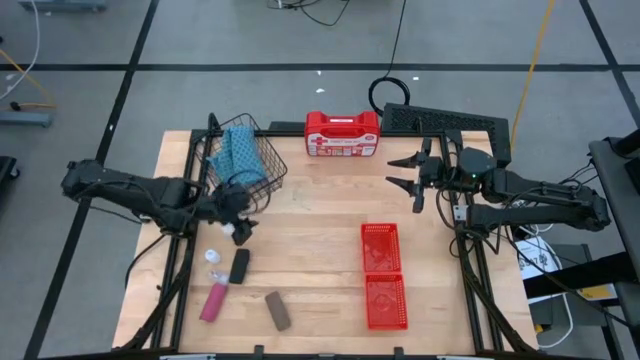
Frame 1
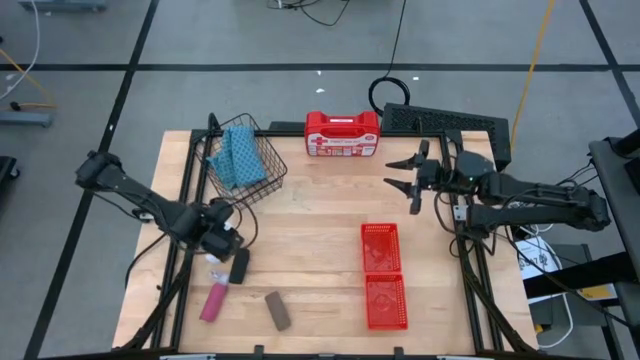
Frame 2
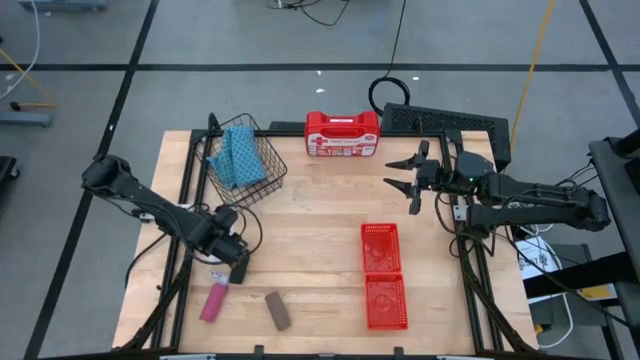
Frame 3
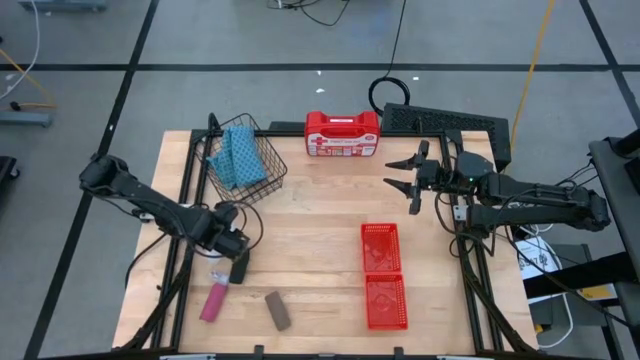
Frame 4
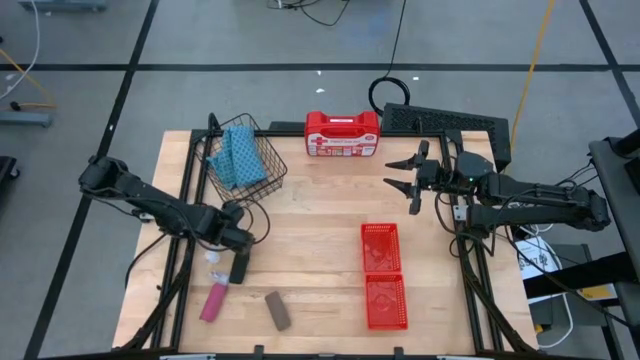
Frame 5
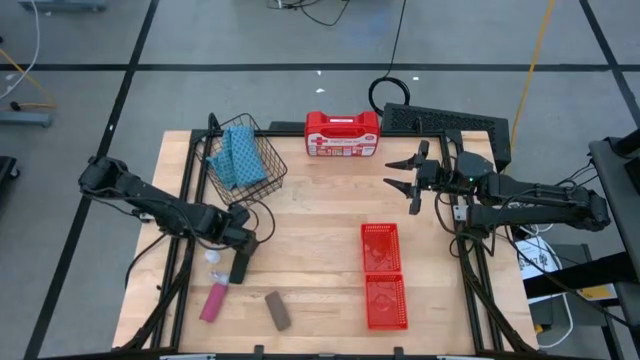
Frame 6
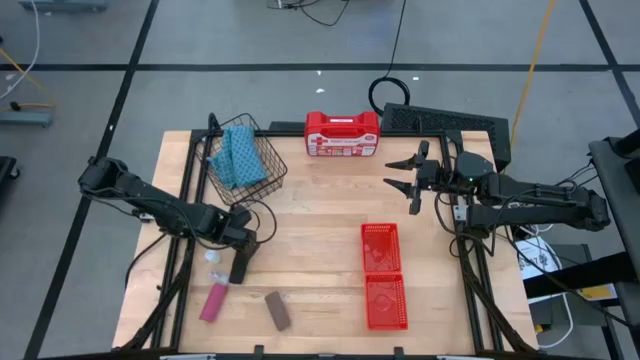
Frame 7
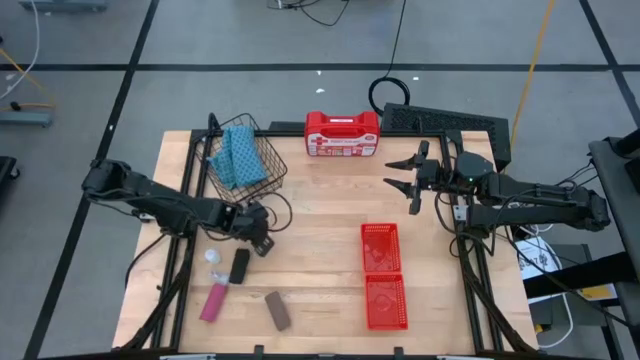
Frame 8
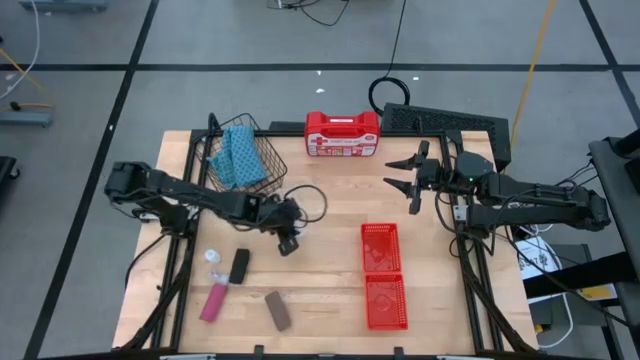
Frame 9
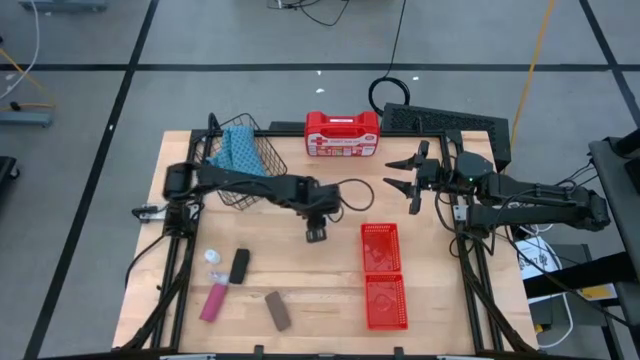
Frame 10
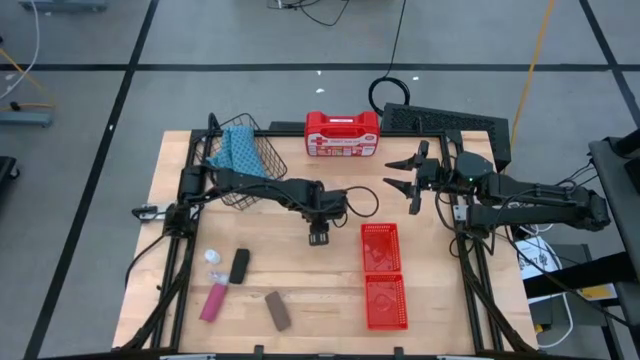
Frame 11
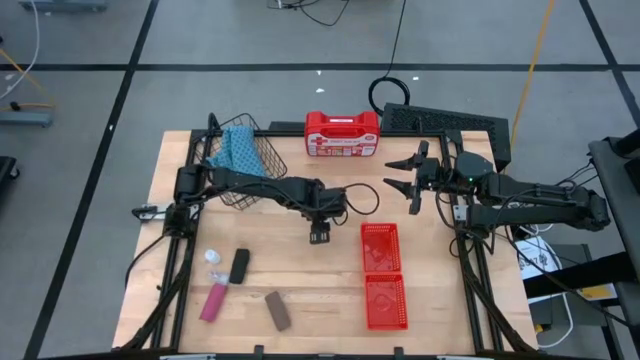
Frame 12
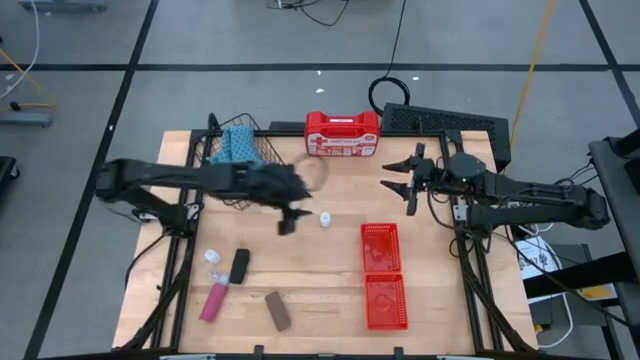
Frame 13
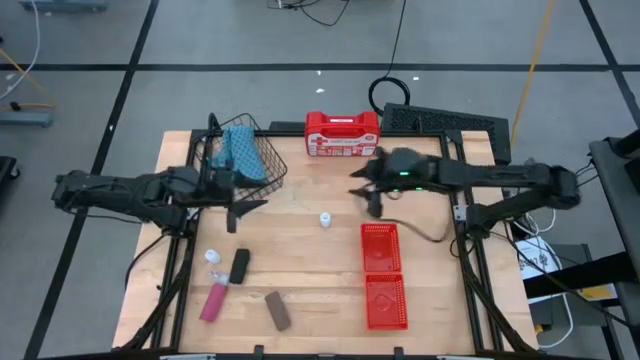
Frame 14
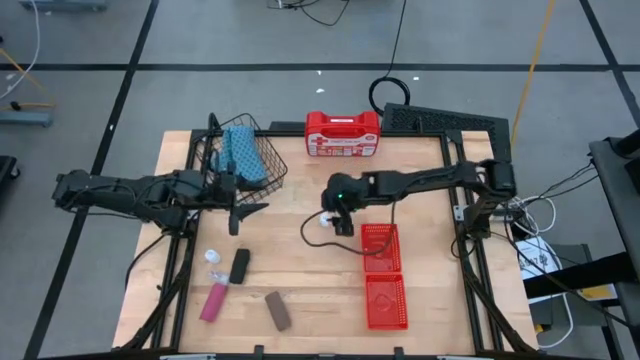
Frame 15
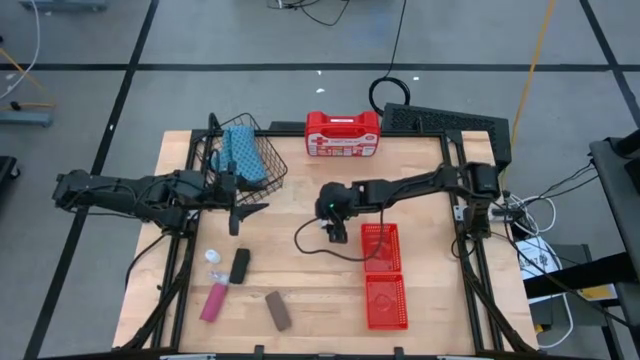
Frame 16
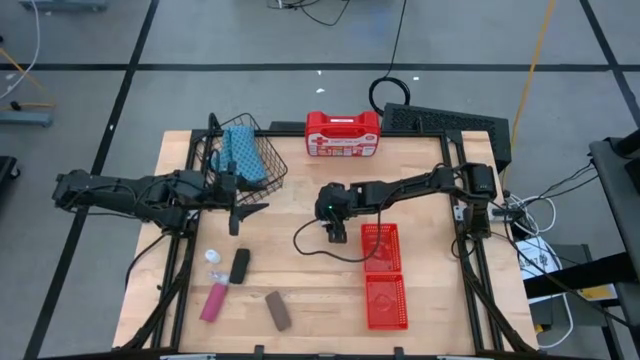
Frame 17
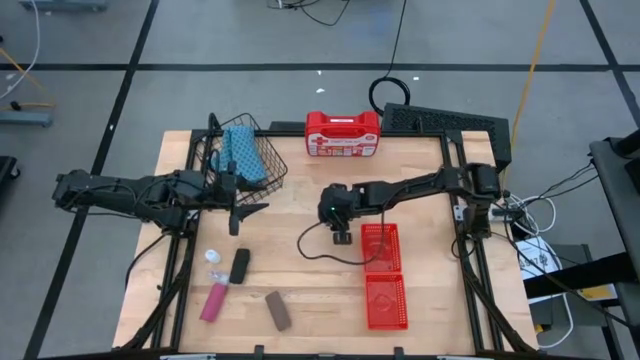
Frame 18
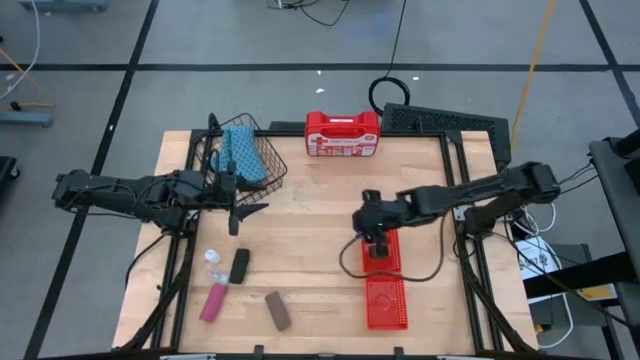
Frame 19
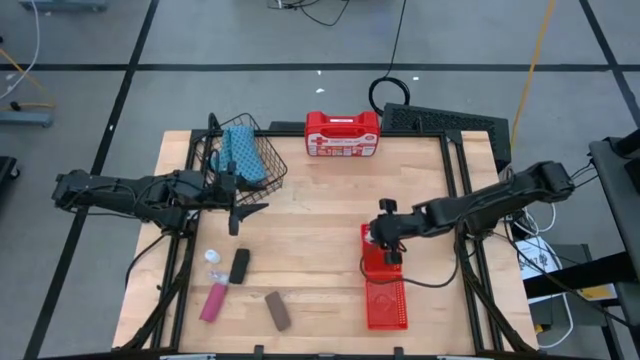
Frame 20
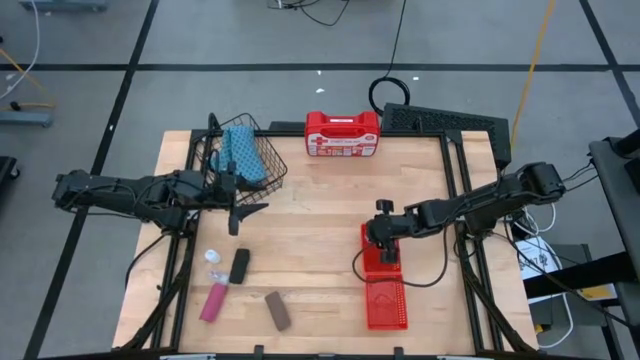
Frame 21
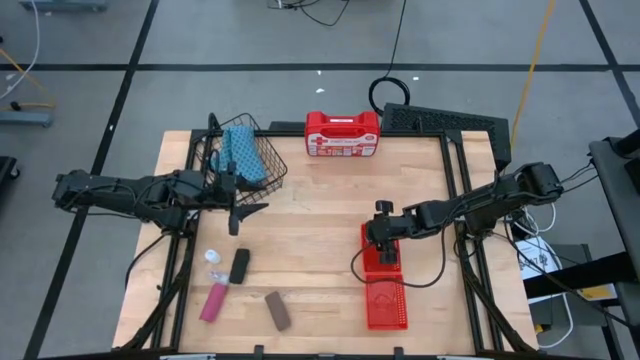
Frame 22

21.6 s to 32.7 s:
Task: Pick & Place Medicine items
Put the top white pill bottle into the top red basket

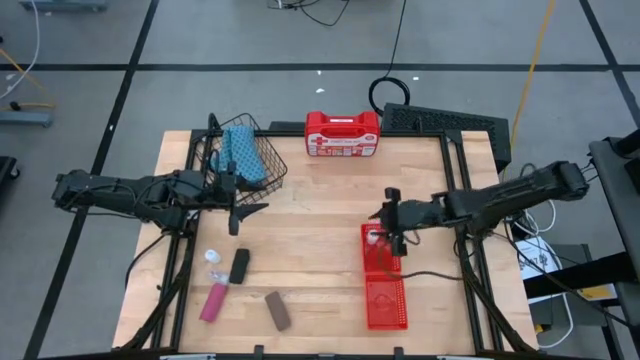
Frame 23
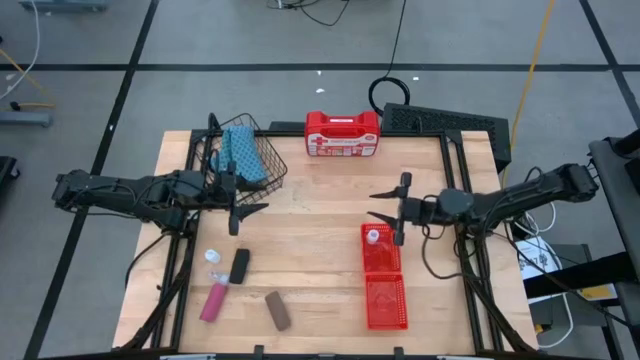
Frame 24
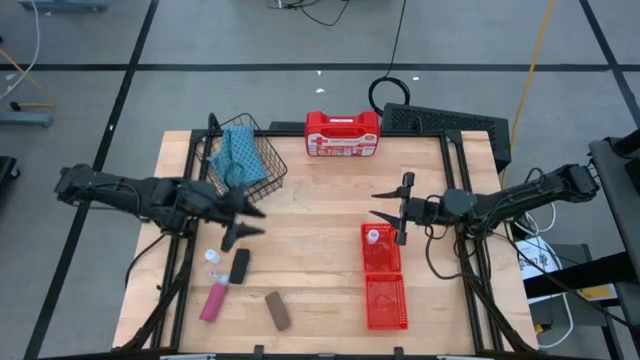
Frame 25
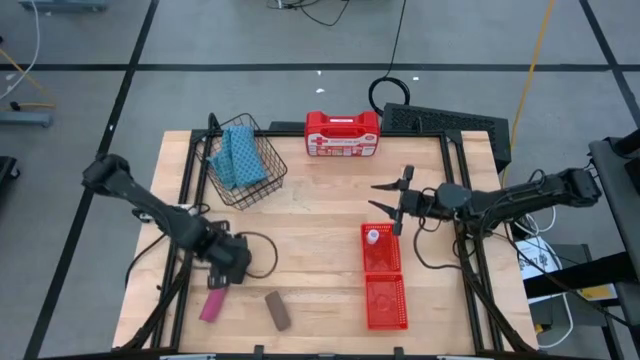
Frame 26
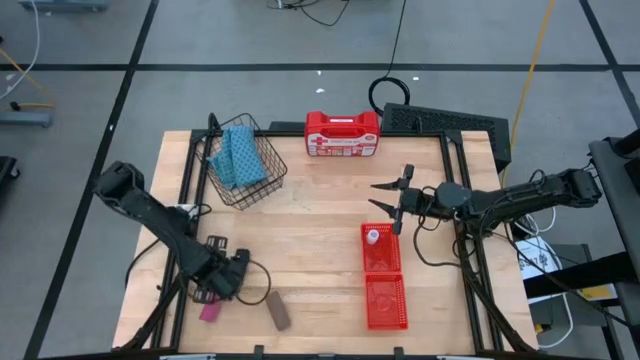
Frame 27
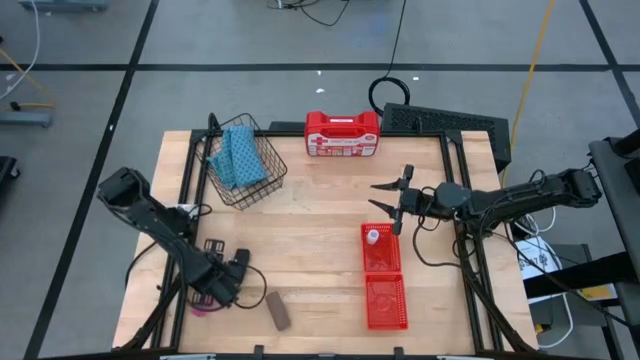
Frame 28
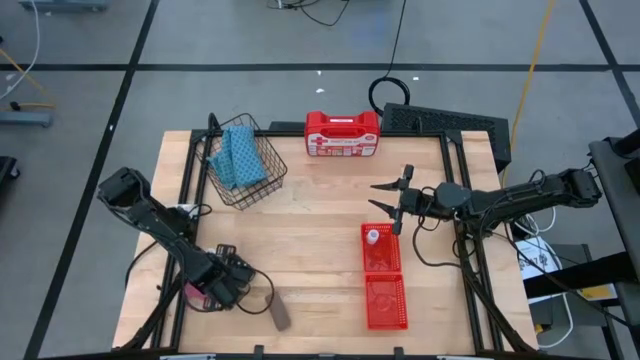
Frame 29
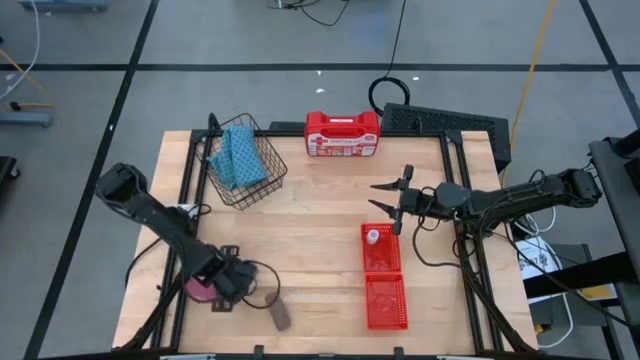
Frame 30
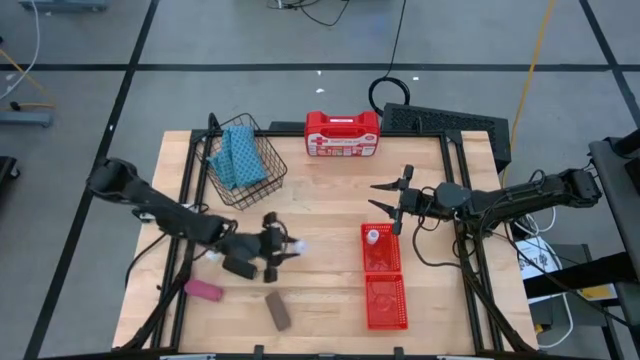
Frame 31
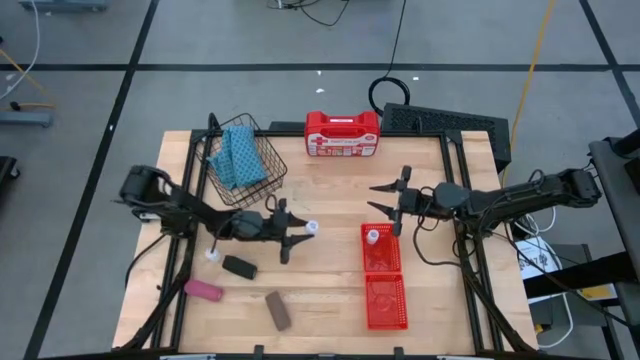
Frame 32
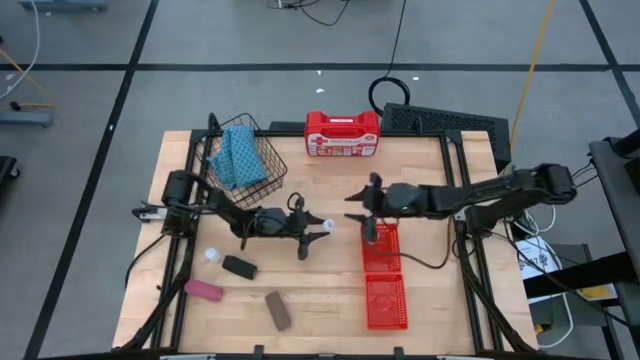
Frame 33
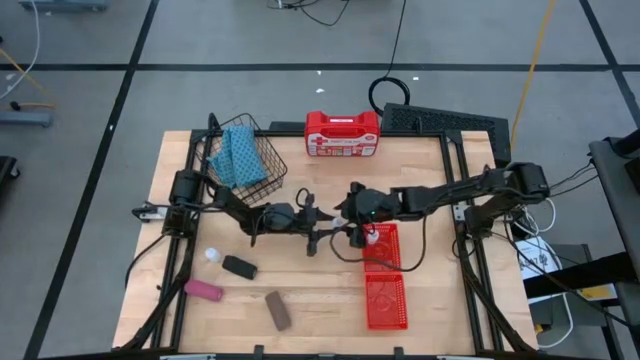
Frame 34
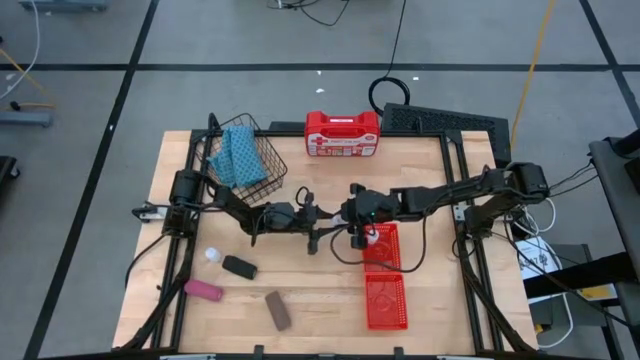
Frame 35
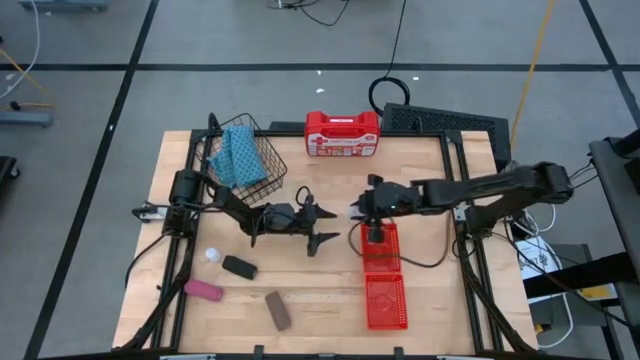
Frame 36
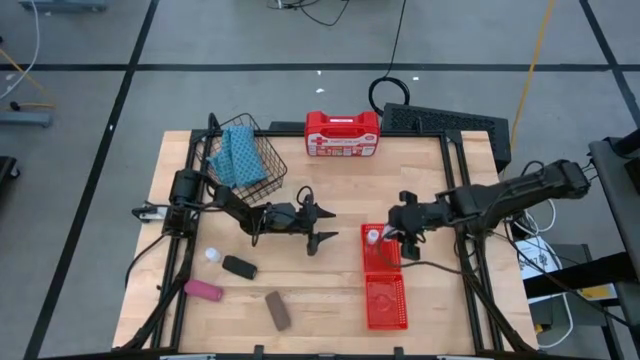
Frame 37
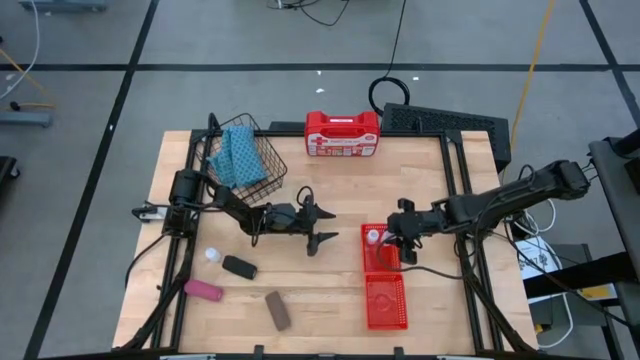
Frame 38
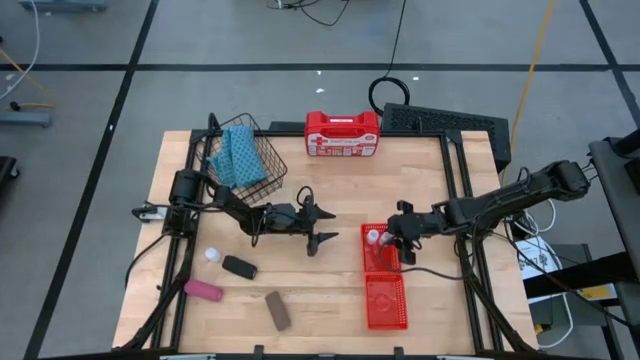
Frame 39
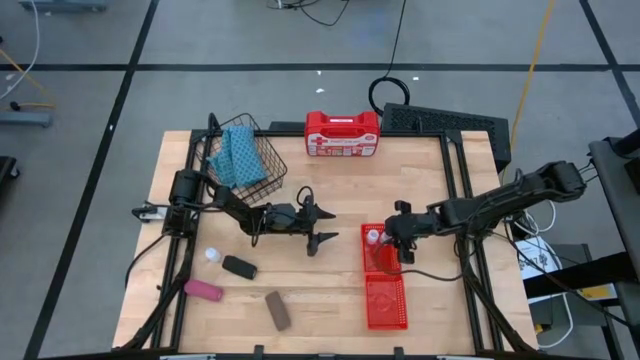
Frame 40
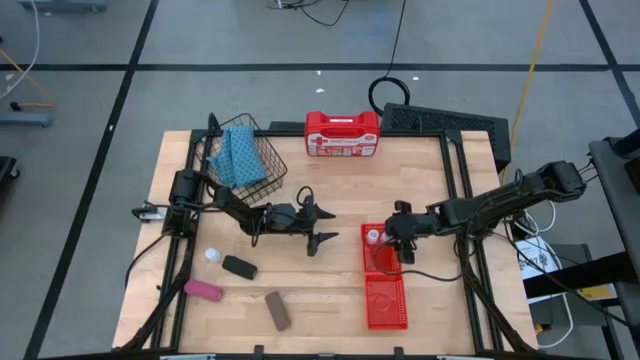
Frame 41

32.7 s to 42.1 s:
Put the bottom white pill bottle into the top red basket

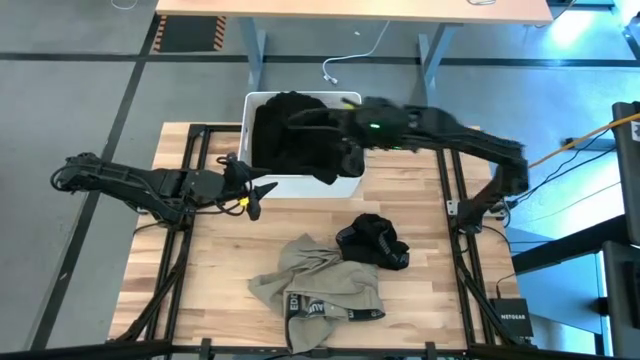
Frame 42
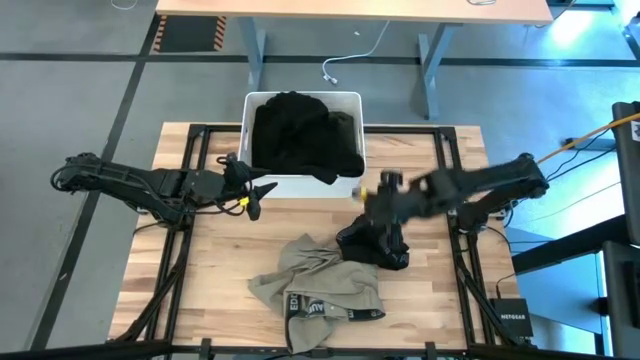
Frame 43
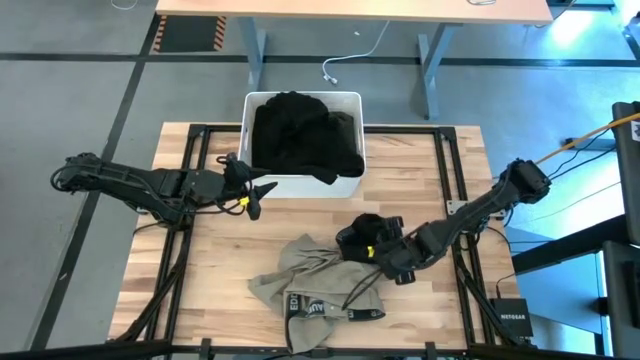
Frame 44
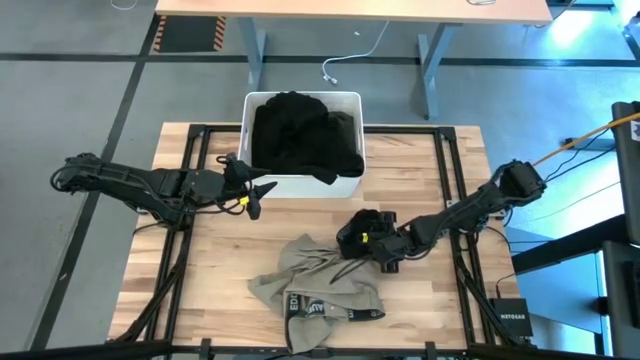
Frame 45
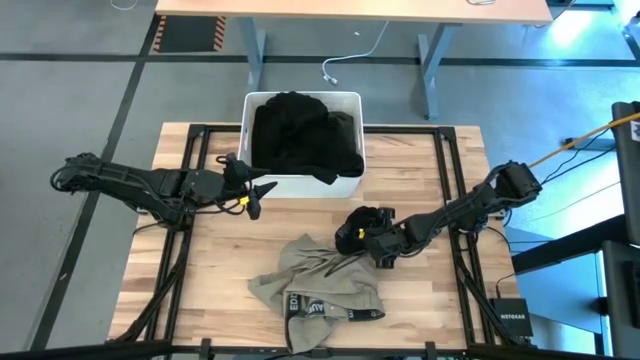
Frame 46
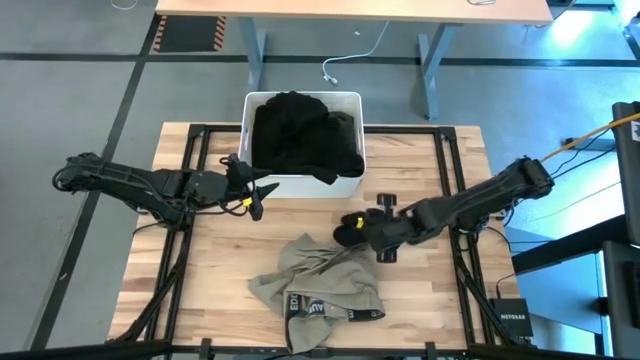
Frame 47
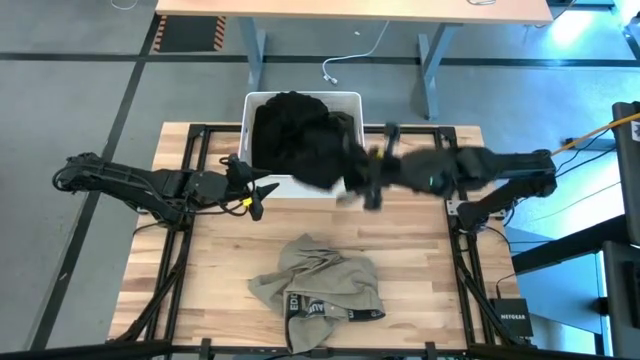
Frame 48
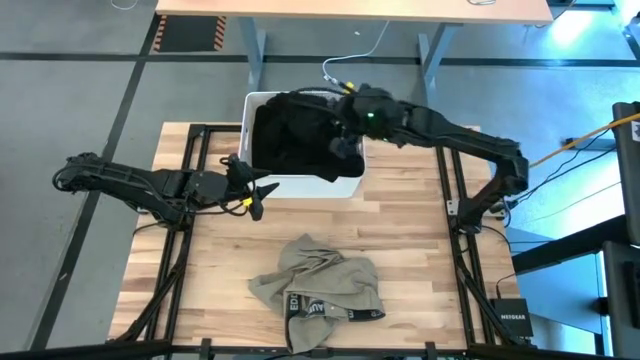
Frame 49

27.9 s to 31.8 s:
Task: Sort clothes
Put the black underwear into the white bin
